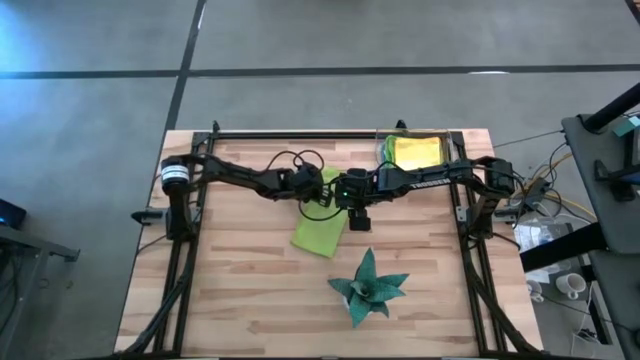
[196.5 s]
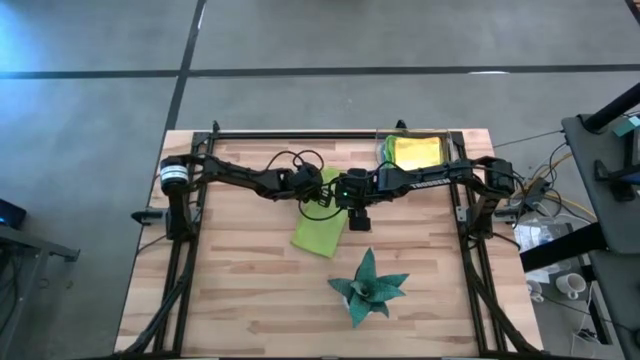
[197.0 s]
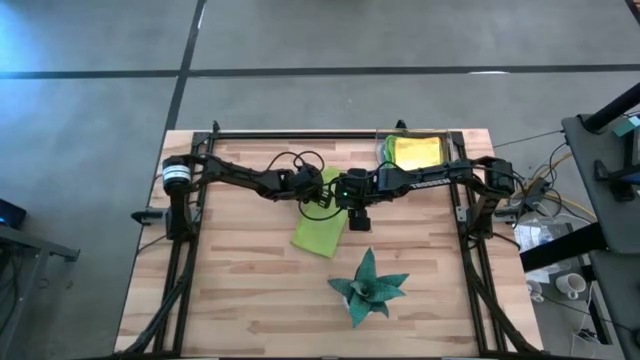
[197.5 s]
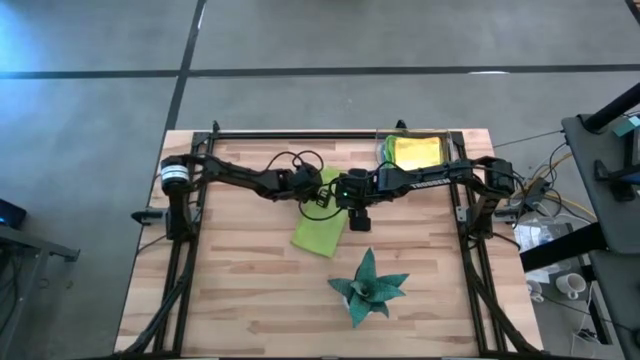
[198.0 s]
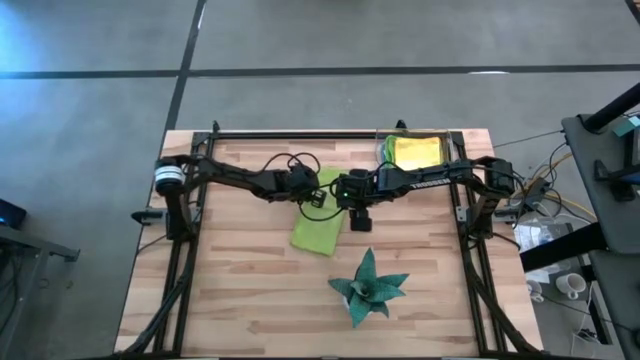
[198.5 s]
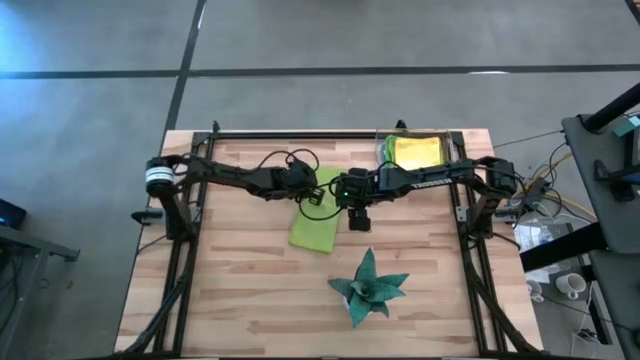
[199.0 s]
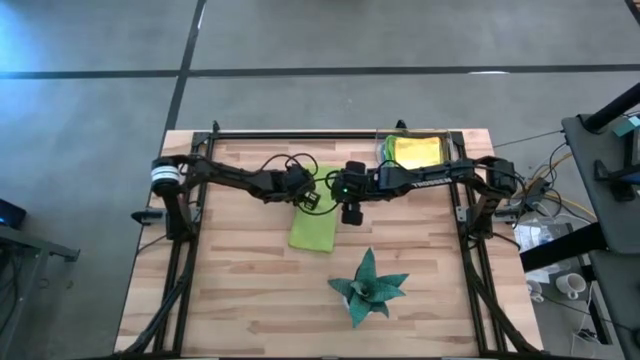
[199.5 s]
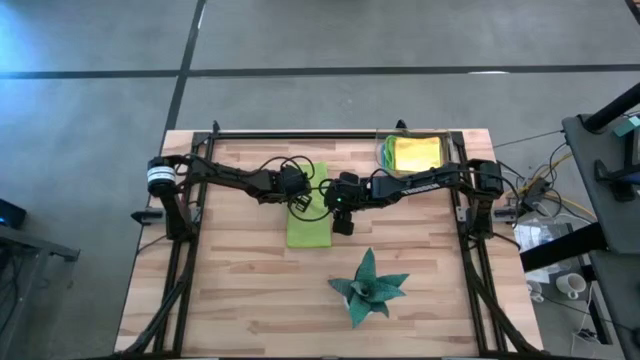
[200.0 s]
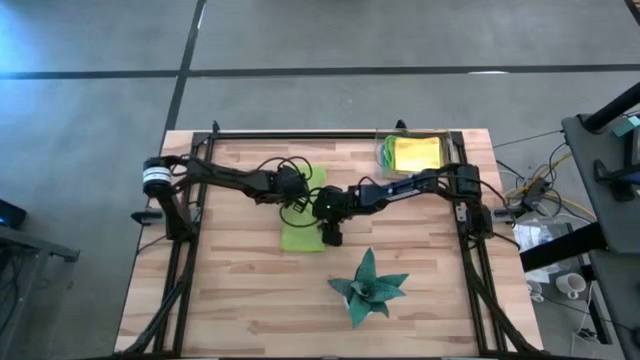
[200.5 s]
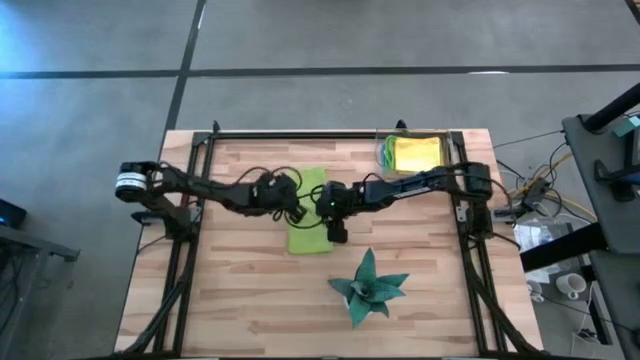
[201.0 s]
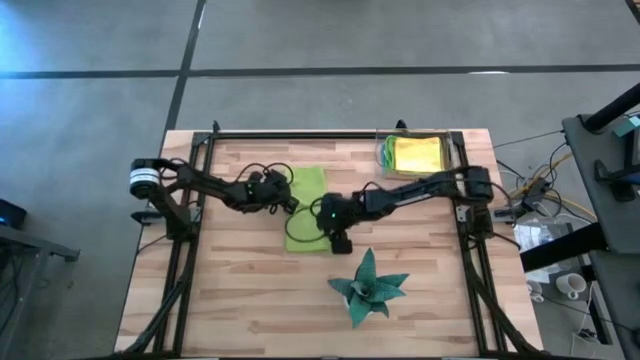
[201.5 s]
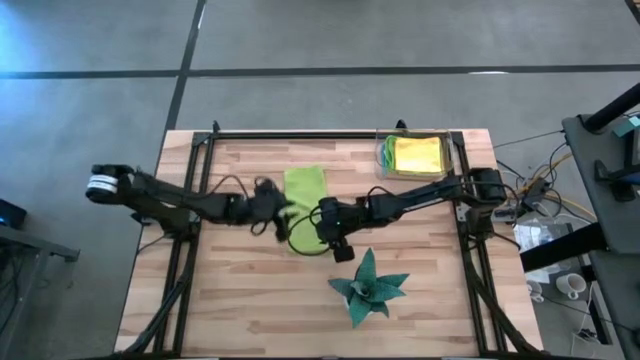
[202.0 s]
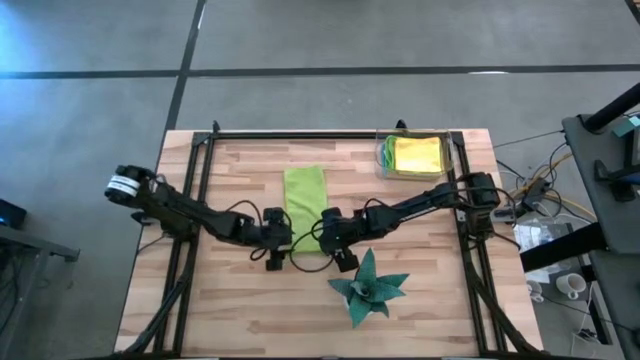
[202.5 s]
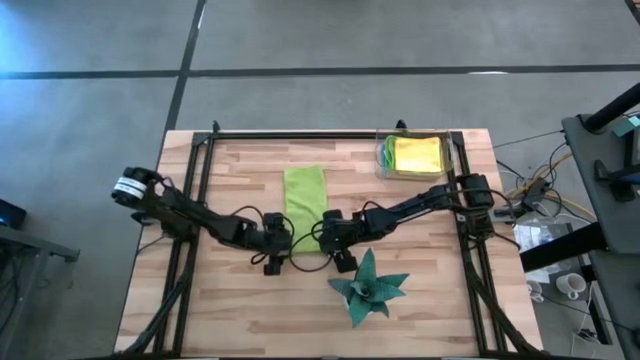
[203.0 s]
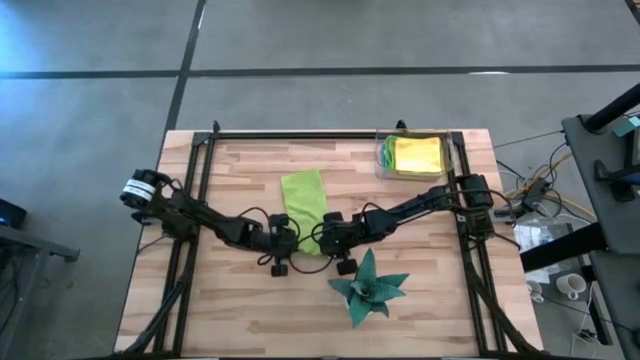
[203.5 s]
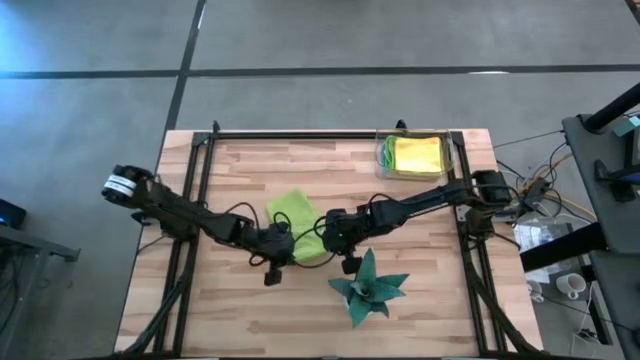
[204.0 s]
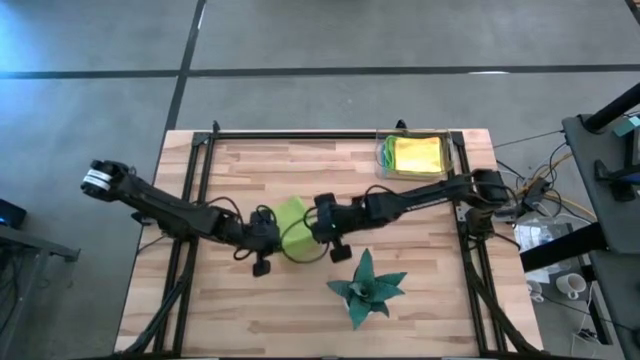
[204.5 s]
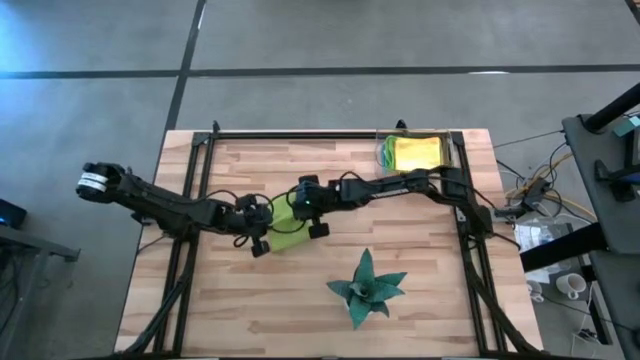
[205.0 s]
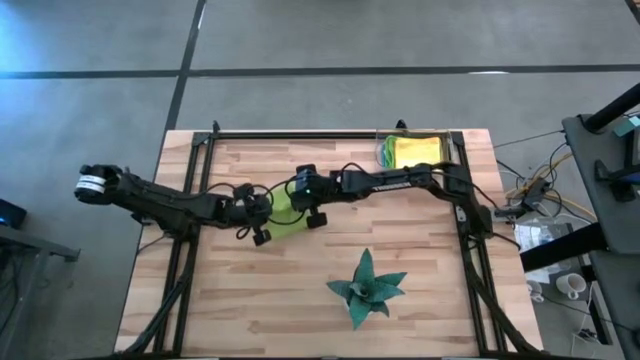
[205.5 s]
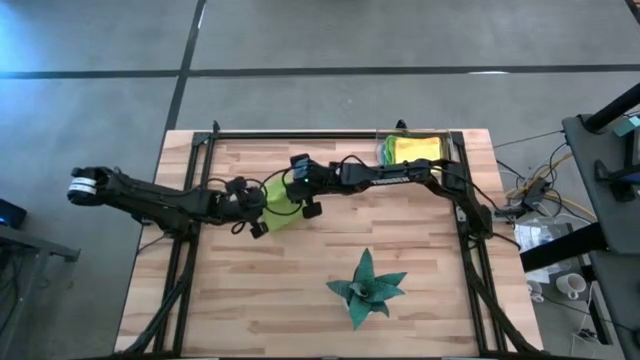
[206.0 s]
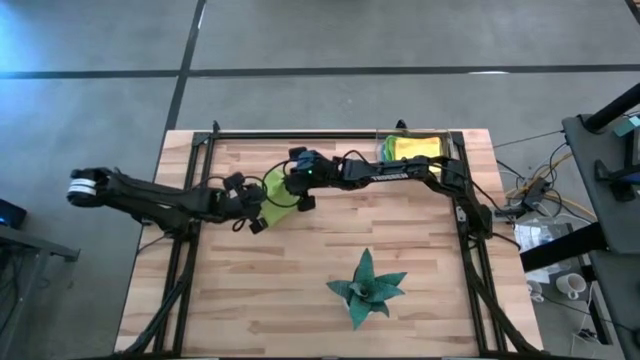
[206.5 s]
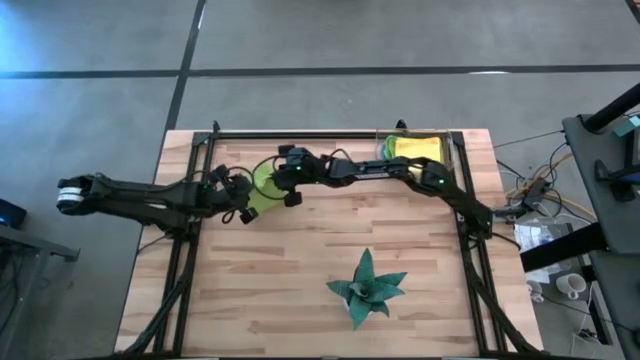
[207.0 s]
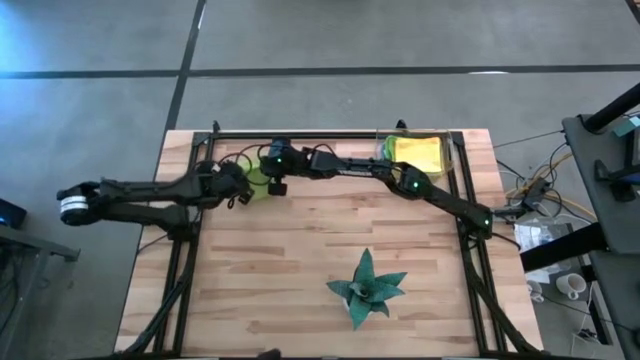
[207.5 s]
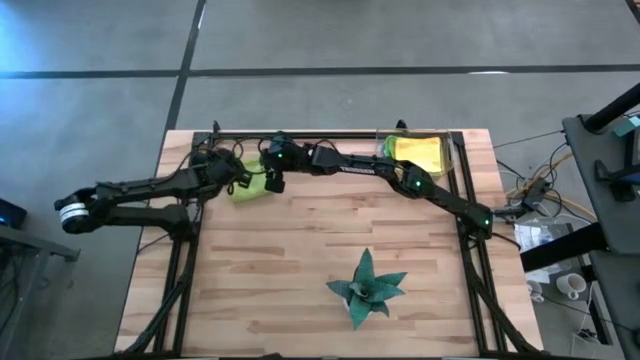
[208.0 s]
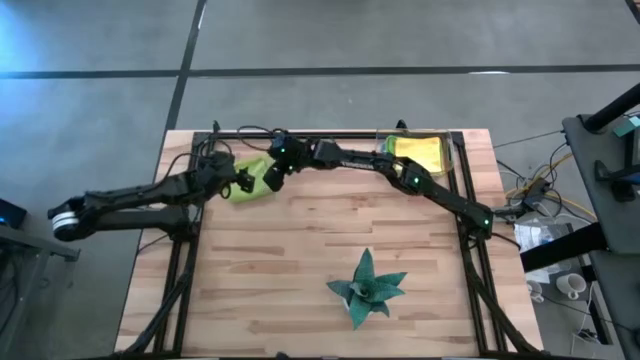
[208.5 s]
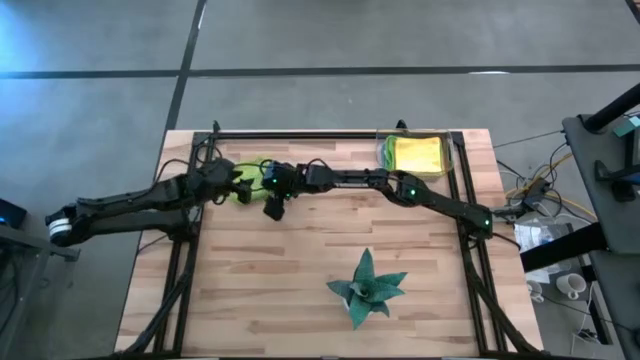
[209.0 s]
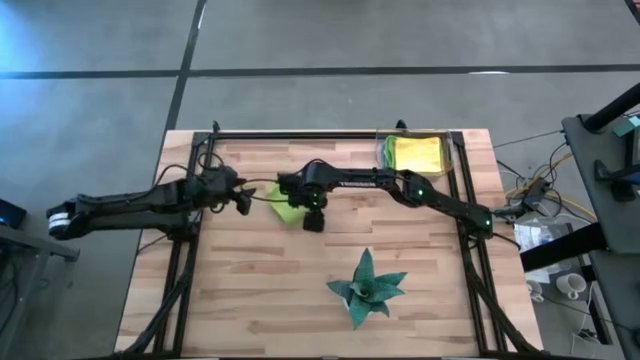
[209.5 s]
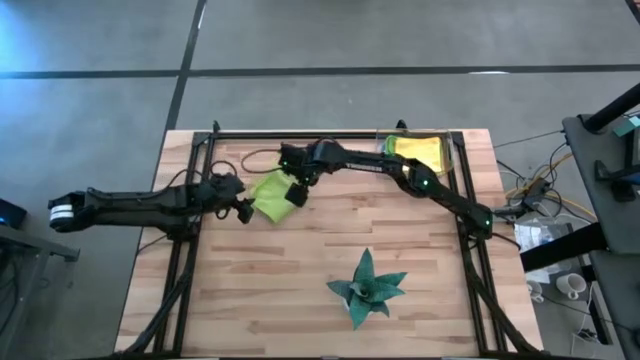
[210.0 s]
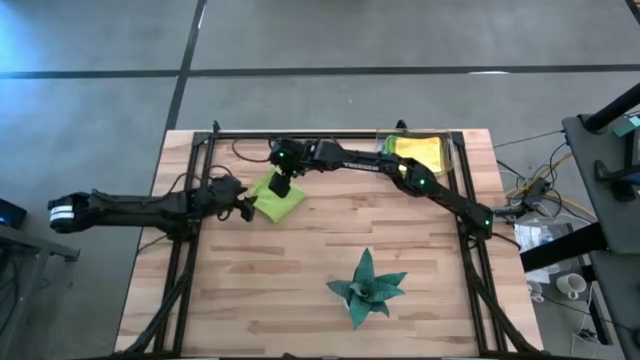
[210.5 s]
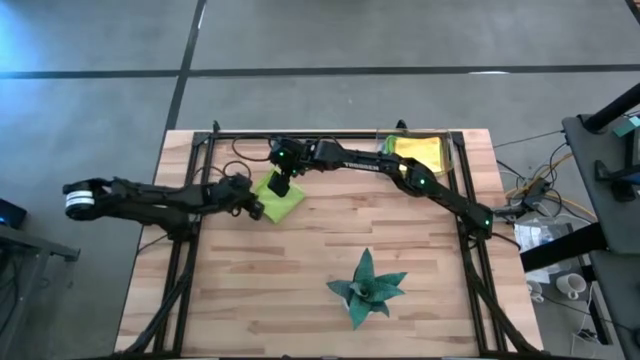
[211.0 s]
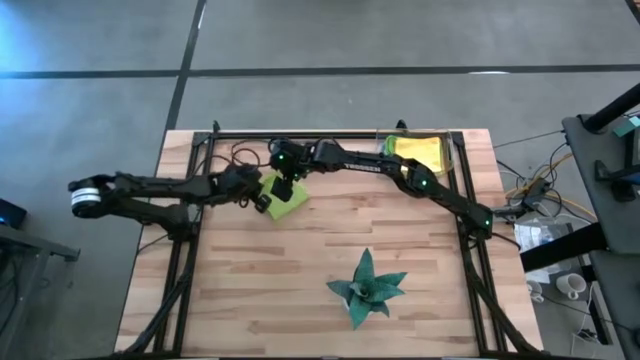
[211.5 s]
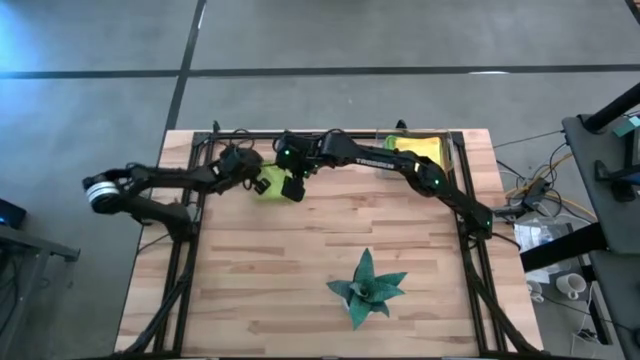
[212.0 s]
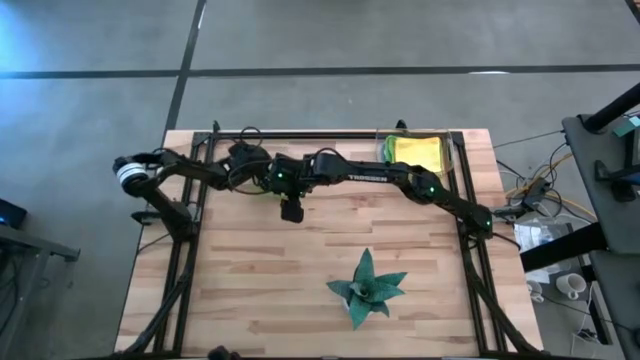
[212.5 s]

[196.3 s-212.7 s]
Task: Fold microfiber towels
Fold the light green microfiber cloth

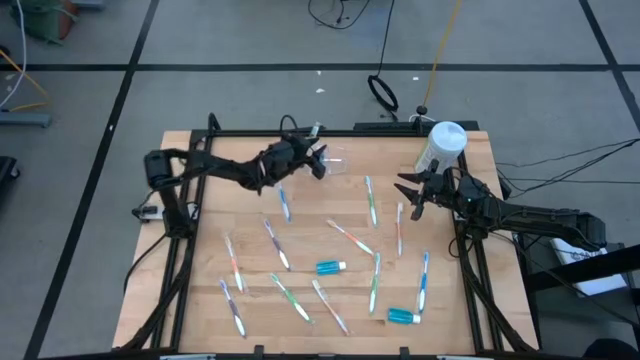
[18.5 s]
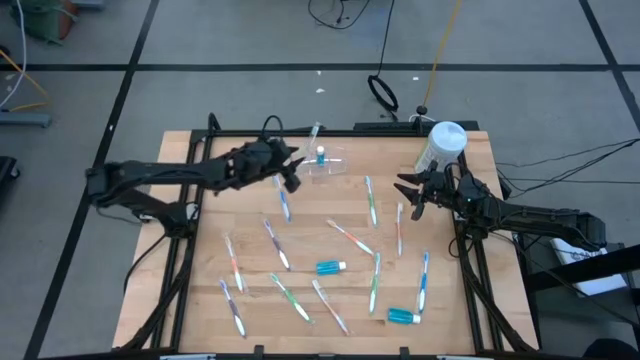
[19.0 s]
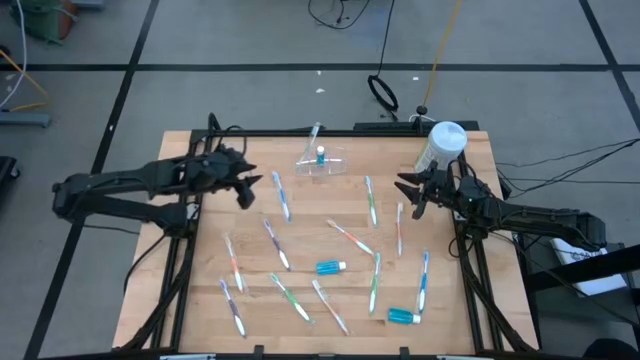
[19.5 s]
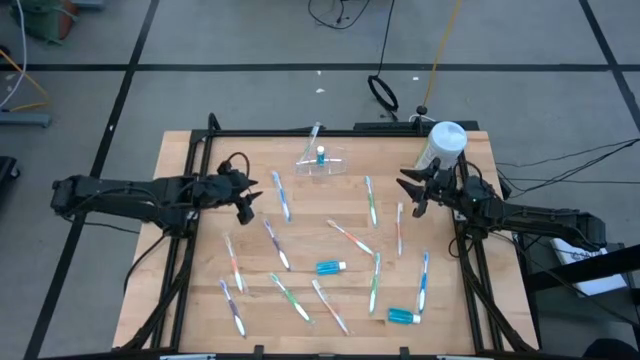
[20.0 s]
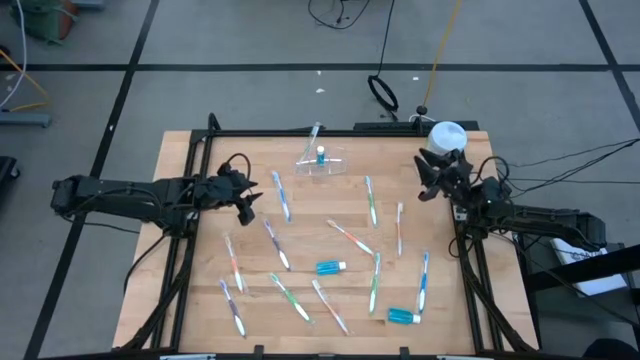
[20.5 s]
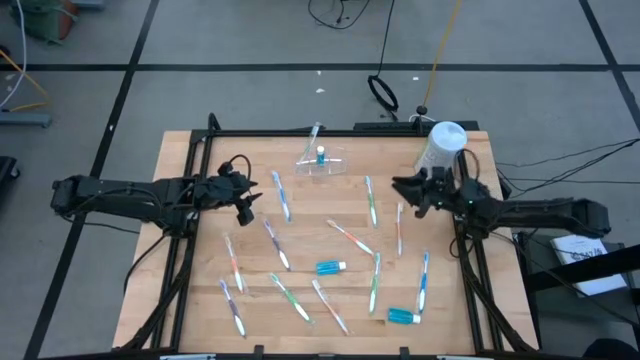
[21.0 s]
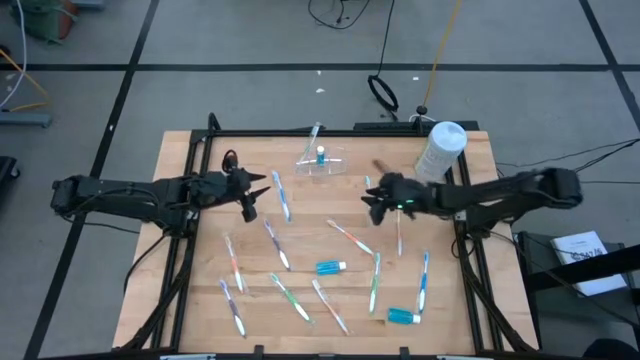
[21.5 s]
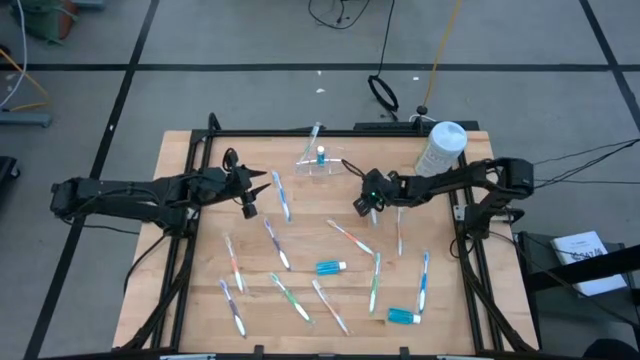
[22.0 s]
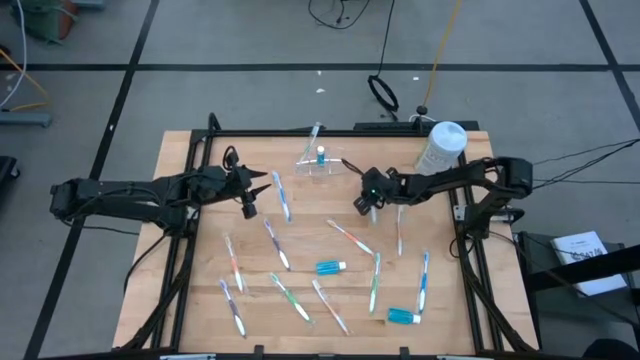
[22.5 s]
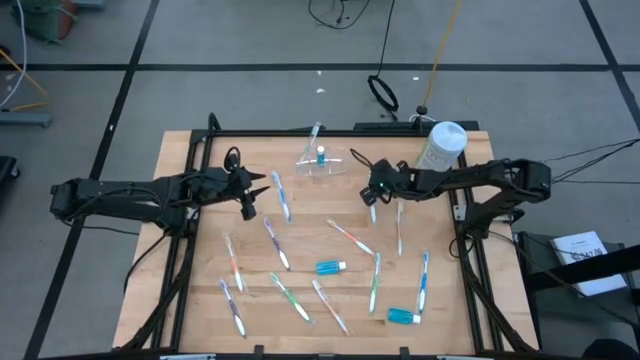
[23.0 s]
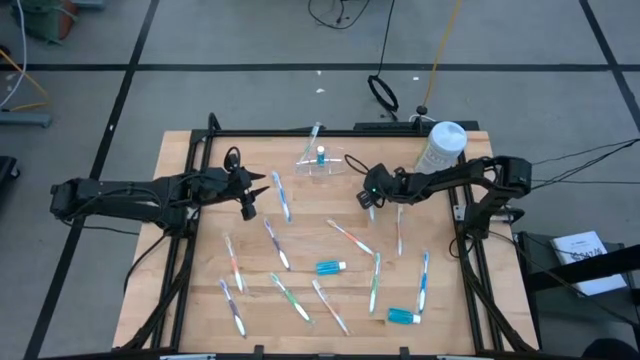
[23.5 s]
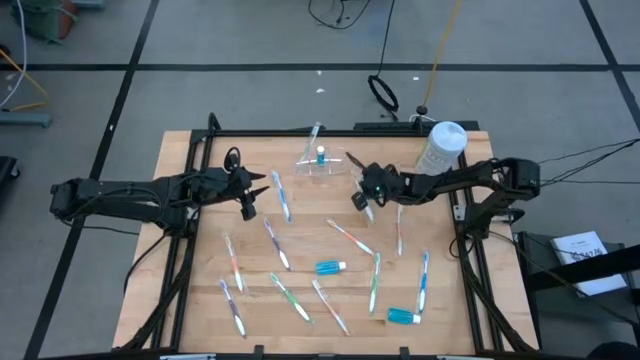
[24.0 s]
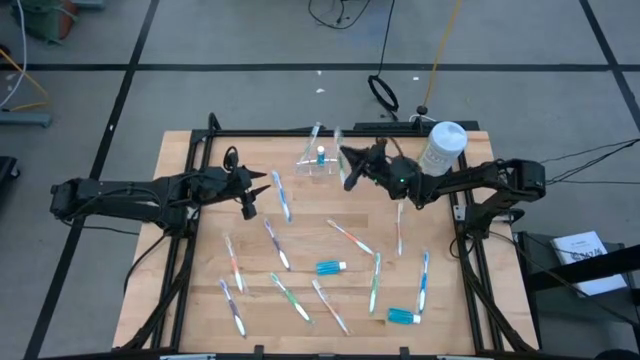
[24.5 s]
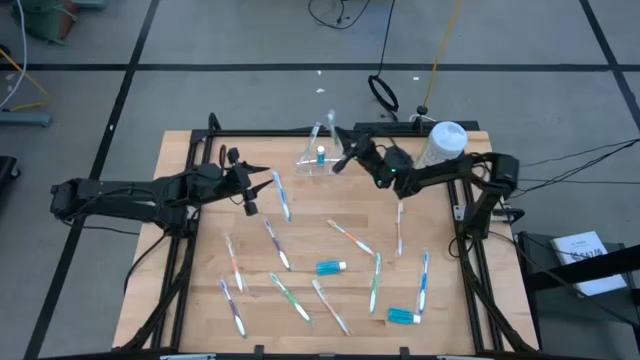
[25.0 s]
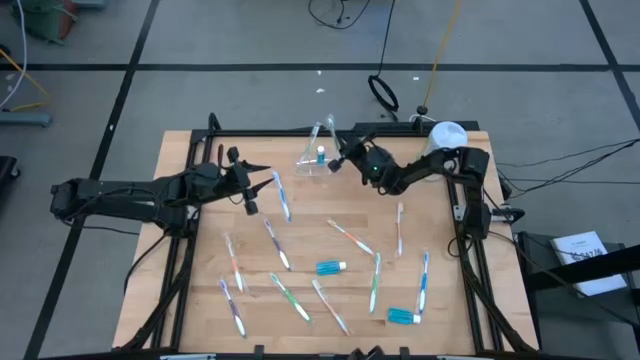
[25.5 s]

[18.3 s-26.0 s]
Task: Pick & Place Toothbrushes
Put the green toothbrush into the transparent organizer
